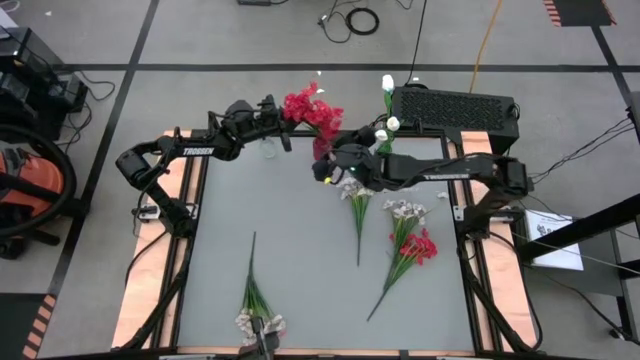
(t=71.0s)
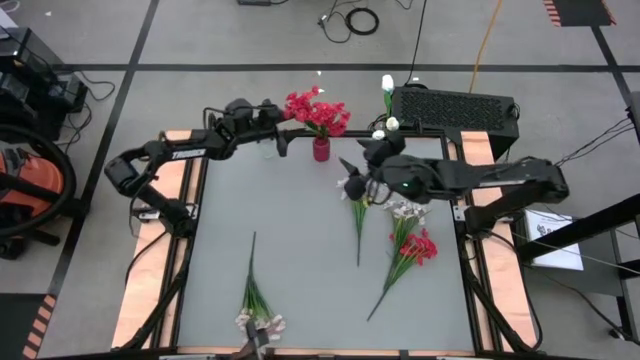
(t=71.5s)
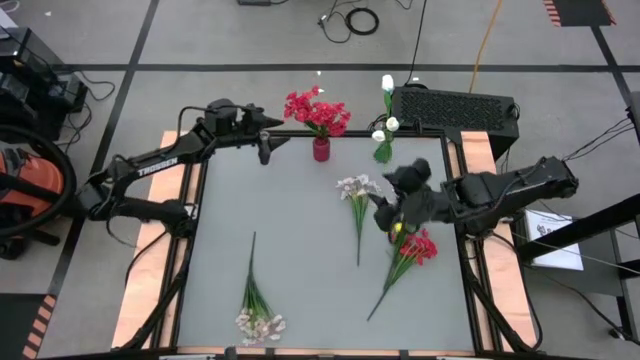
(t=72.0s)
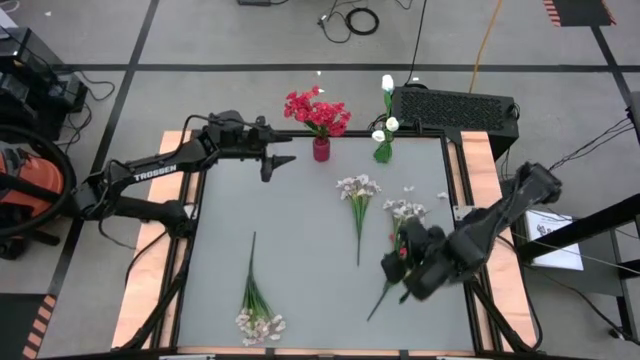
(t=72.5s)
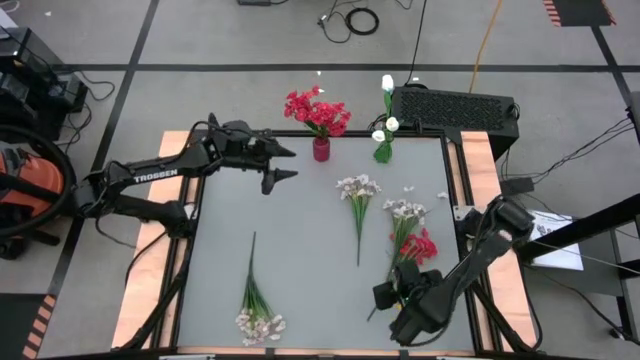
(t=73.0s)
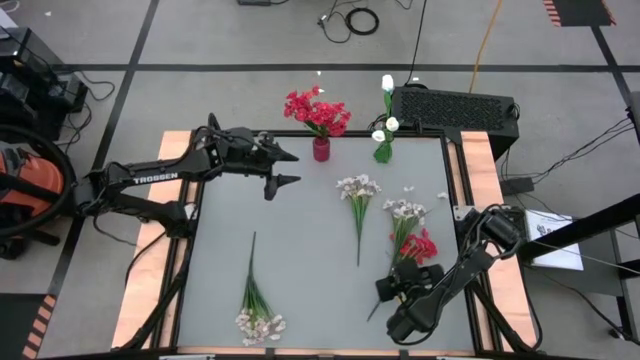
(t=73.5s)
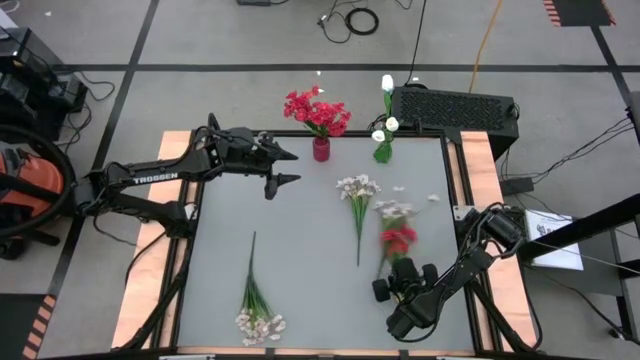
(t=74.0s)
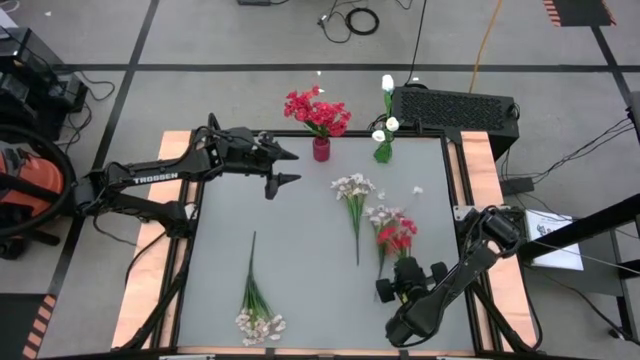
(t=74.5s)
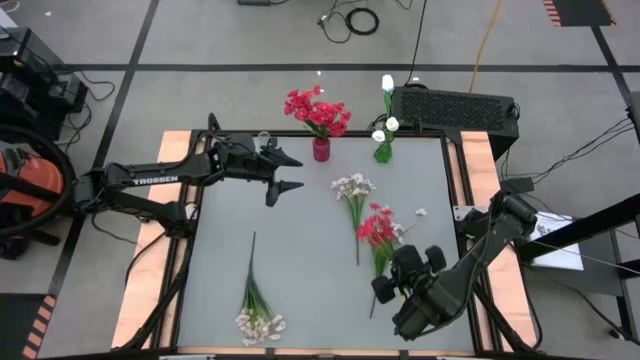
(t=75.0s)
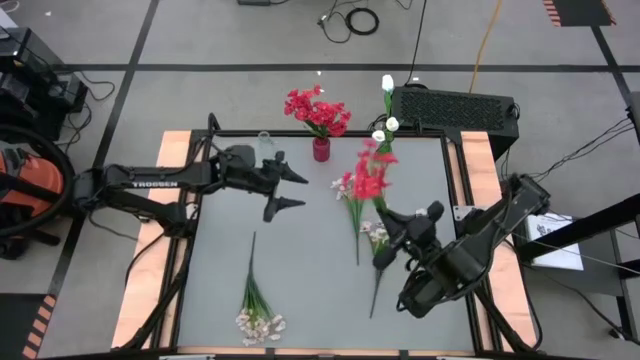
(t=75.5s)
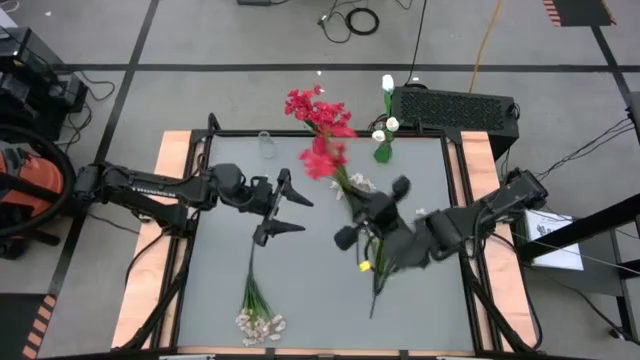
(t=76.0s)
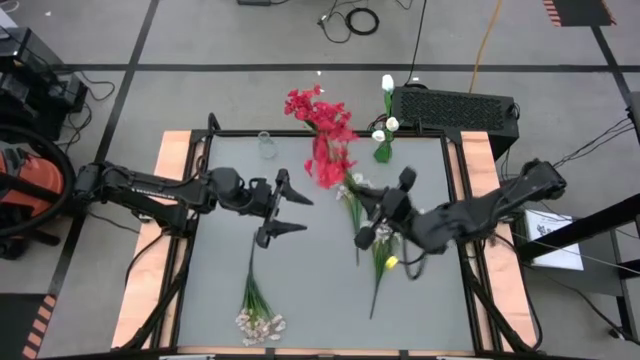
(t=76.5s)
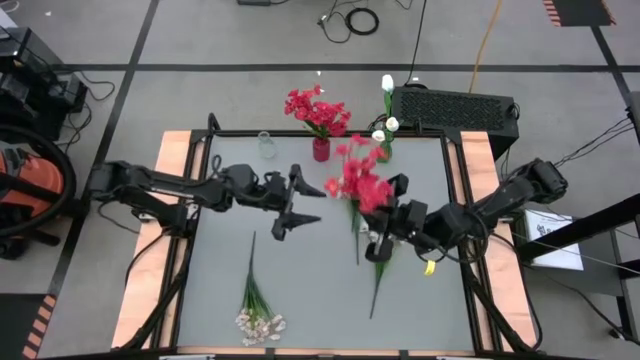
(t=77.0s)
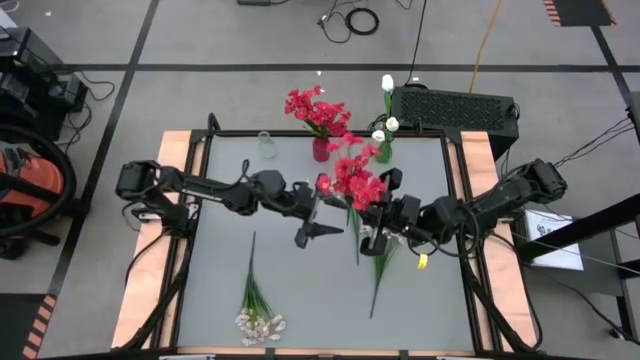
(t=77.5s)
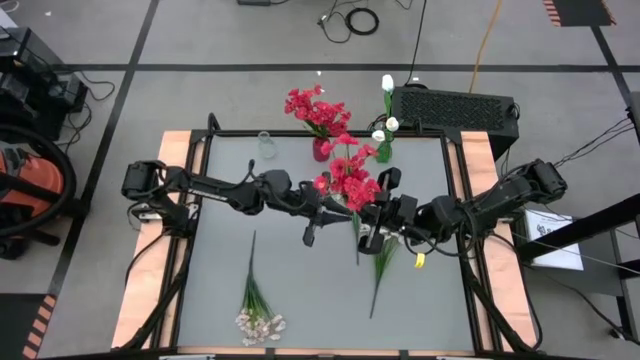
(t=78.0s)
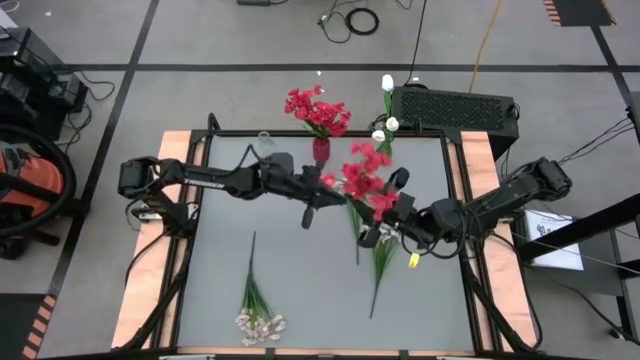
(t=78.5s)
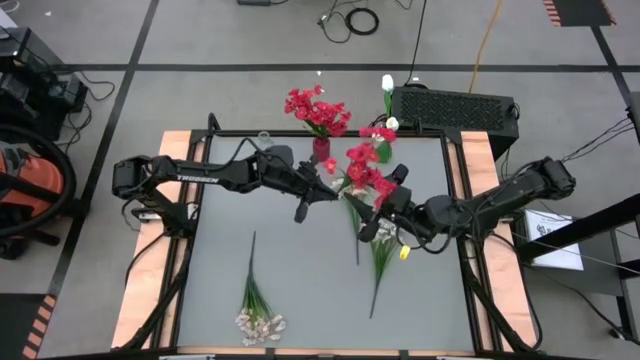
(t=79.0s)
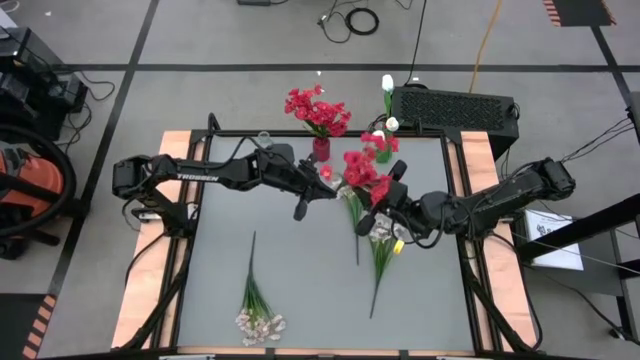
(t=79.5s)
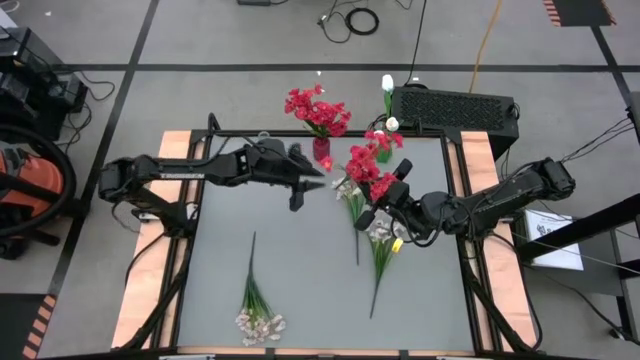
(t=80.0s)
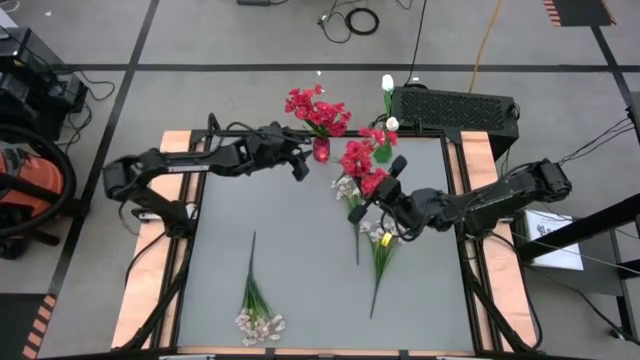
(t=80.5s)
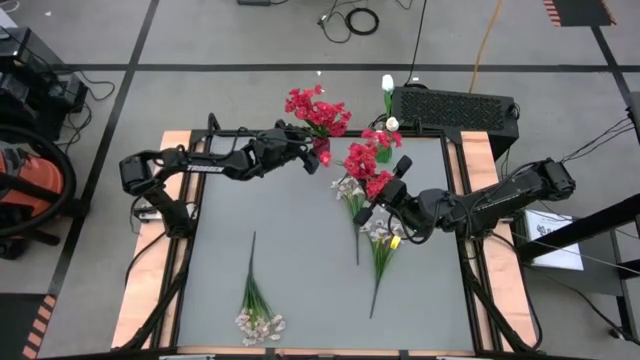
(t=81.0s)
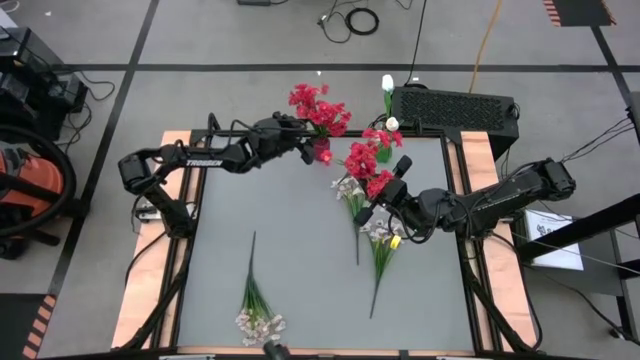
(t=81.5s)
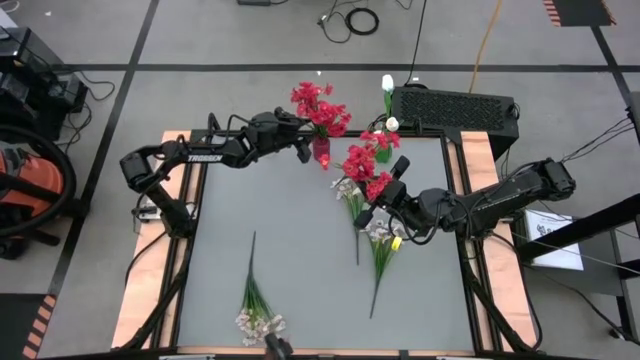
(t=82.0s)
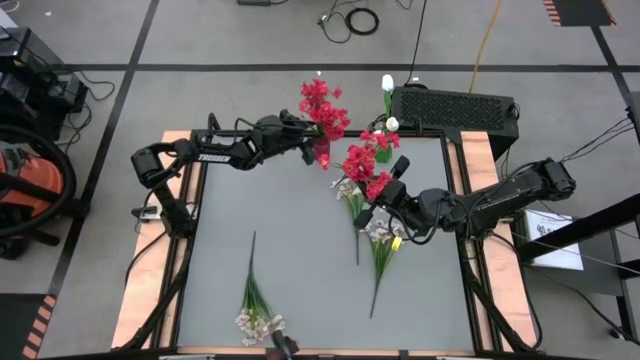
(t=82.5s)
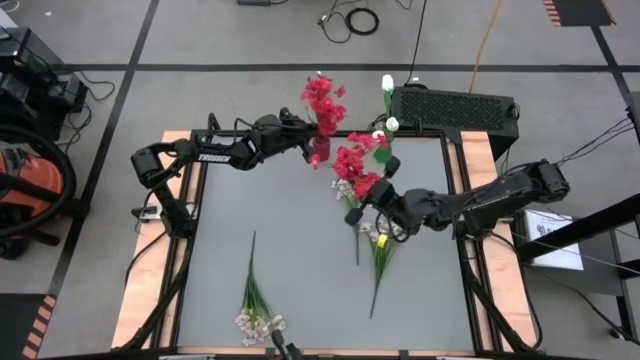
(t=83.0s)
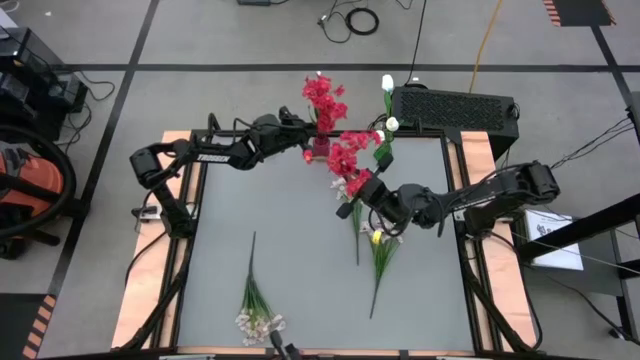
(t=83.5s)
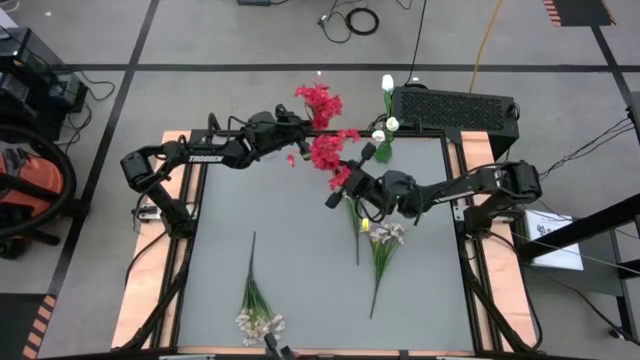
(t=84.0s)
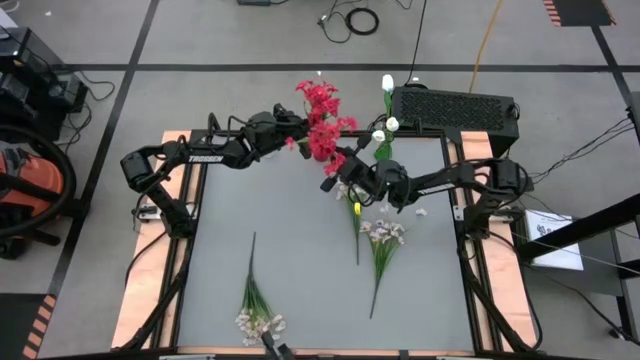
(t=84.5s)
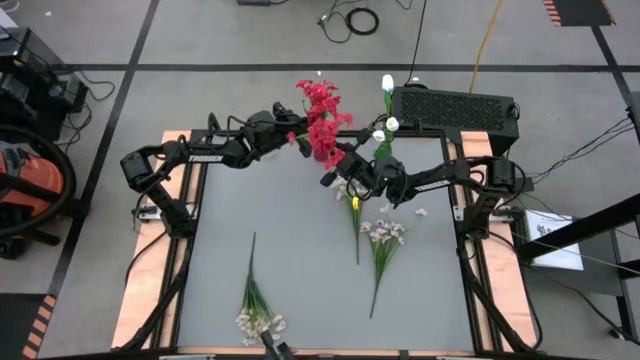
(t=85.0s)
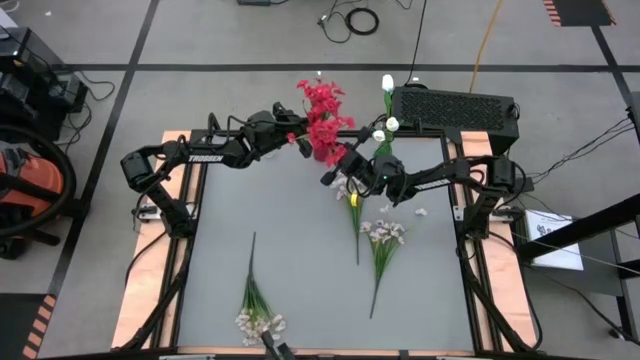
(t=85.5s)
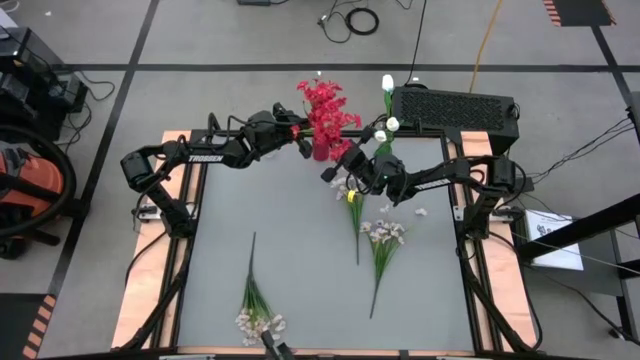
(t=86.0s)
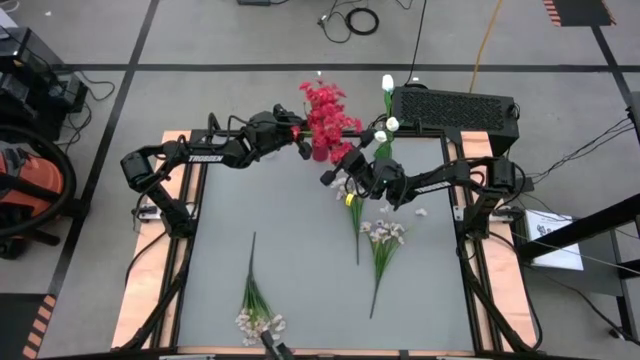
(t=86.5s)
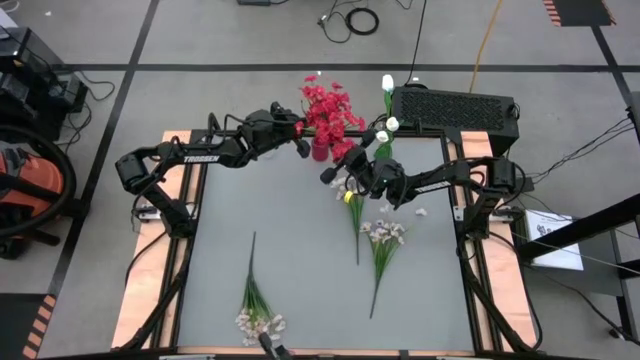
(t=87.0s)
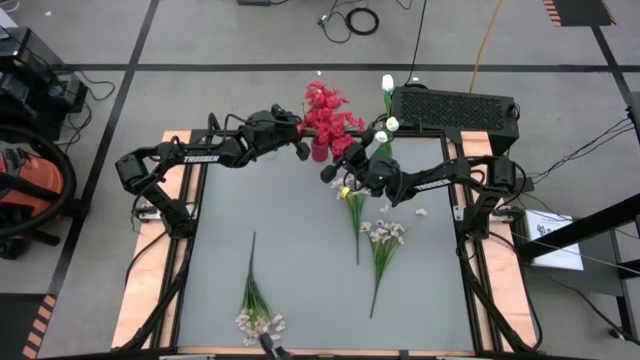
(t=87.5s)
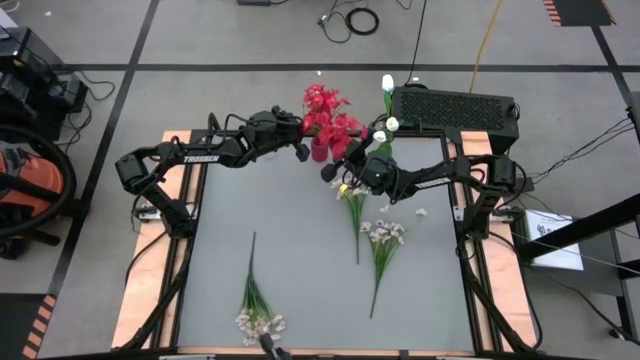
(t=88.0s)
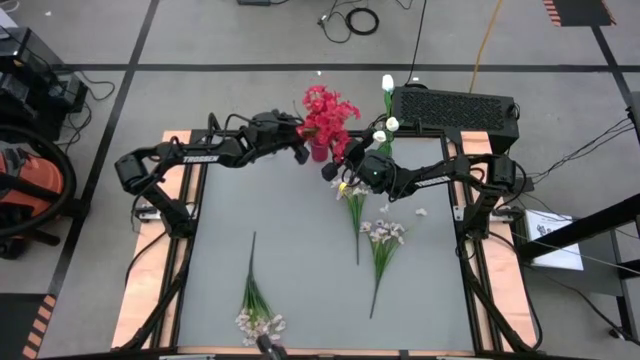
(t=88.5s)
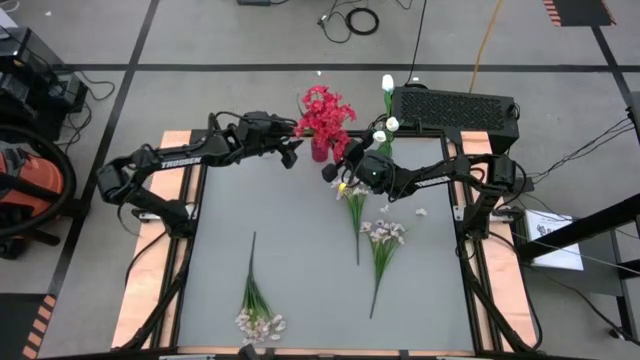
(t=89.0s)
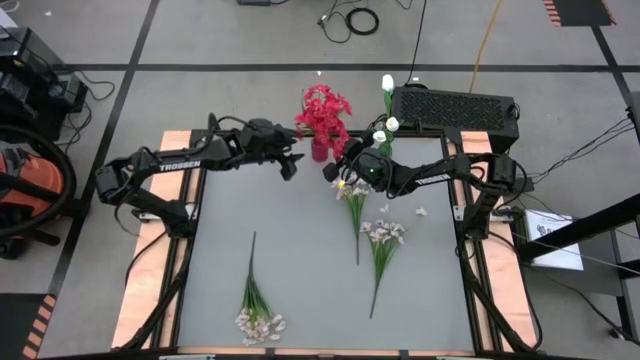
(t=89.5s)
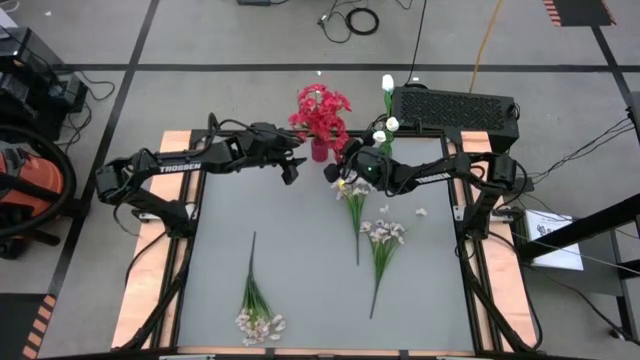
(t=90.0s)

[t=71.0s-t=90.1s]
Task: Sort flowers into vase by color
Put the red flowers into the red vase

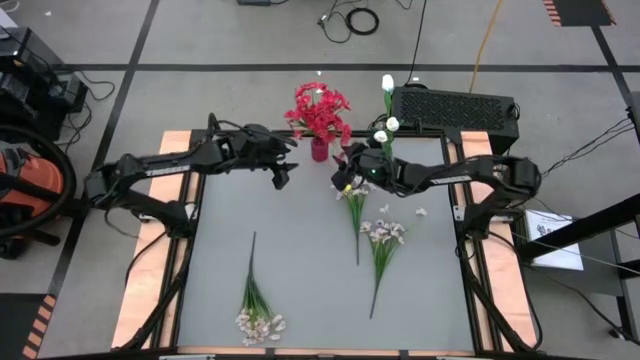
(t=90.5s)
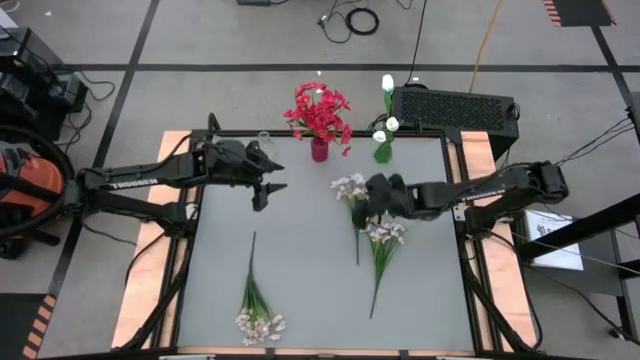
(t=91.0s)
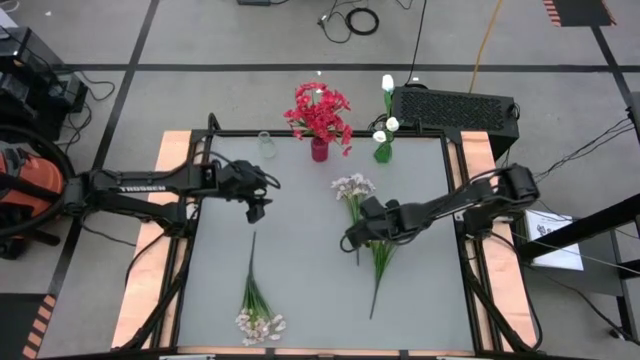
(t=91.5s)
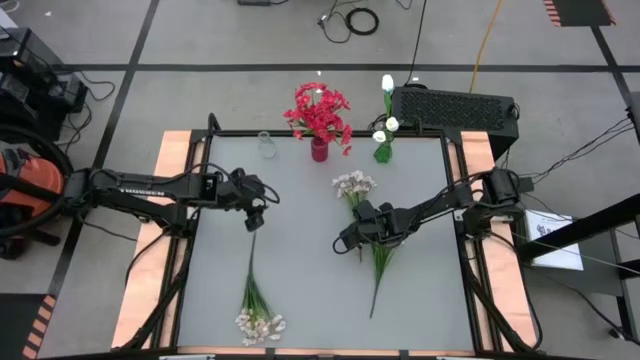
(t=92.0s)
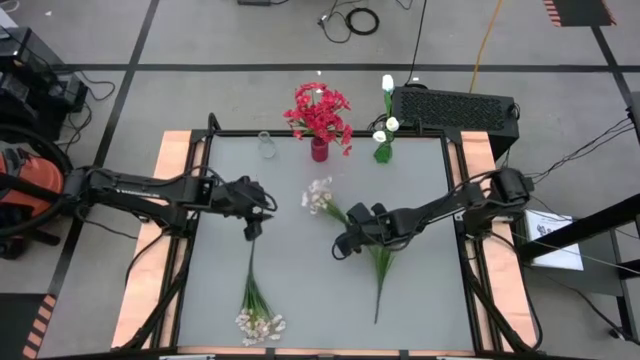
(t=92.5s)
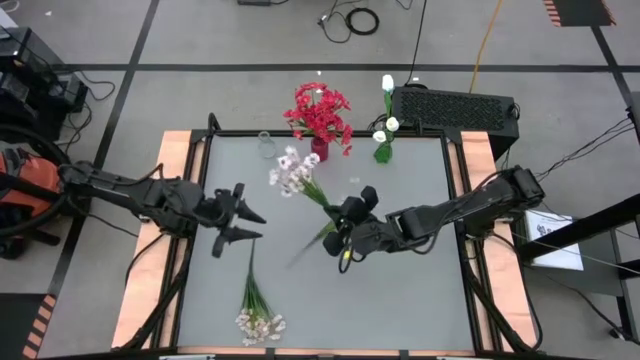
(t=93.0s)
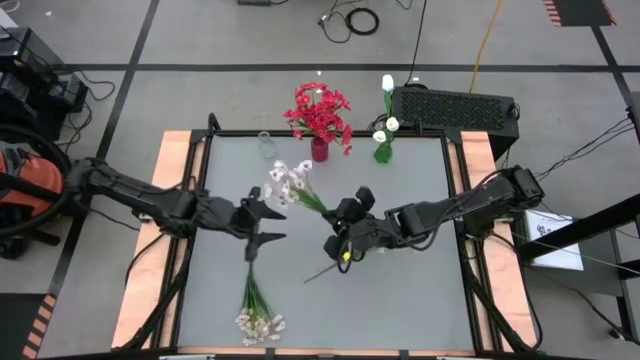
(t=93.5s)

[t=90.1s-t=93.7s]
Put the top white flowers into the transparent vase
